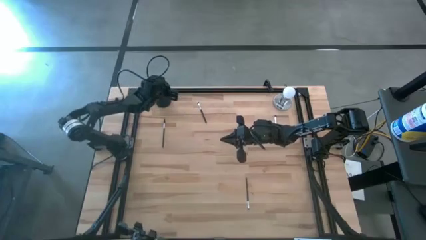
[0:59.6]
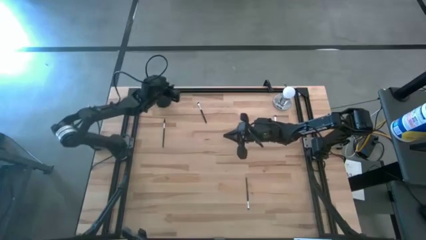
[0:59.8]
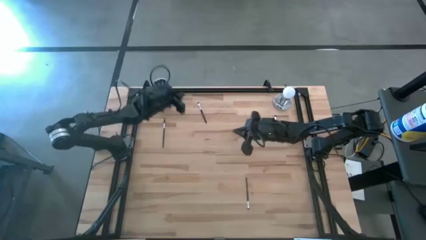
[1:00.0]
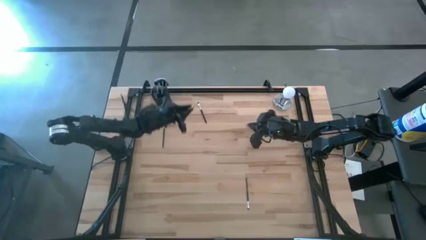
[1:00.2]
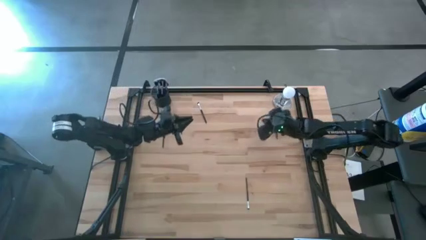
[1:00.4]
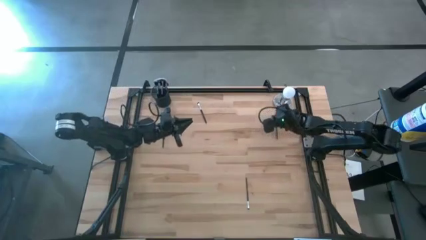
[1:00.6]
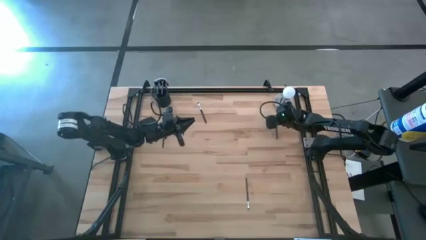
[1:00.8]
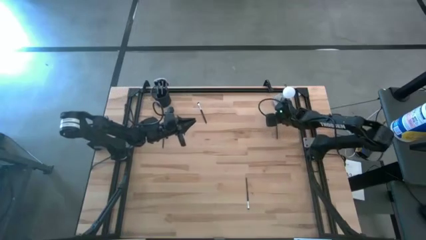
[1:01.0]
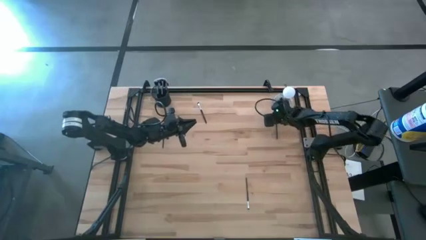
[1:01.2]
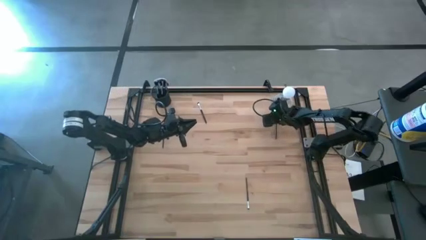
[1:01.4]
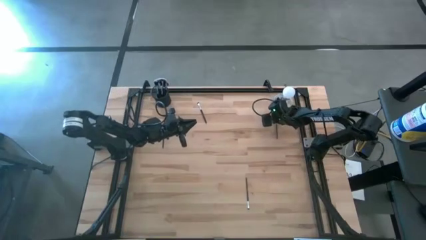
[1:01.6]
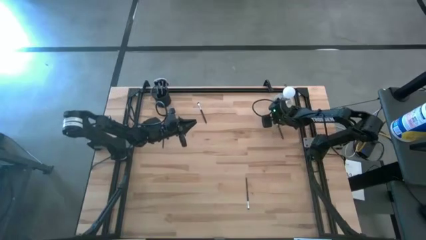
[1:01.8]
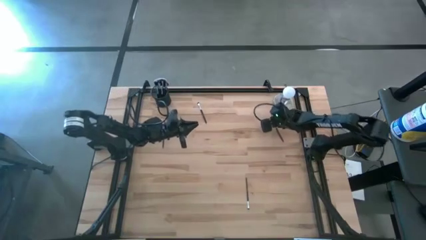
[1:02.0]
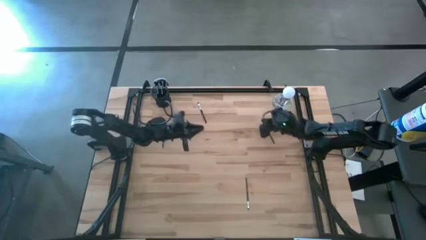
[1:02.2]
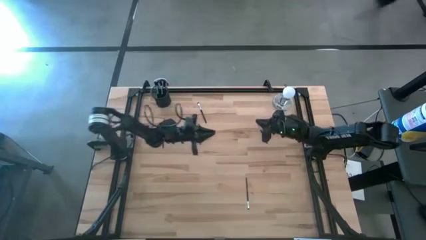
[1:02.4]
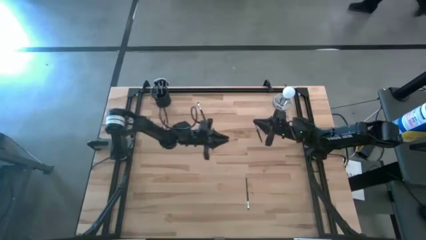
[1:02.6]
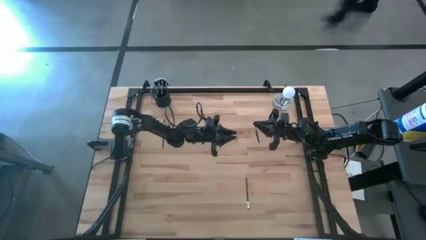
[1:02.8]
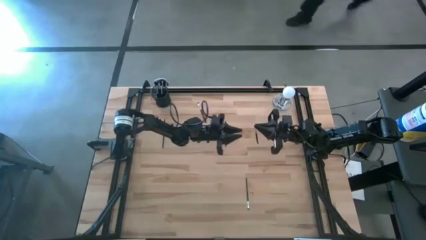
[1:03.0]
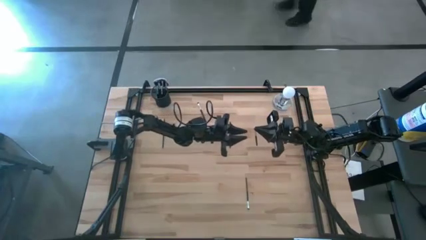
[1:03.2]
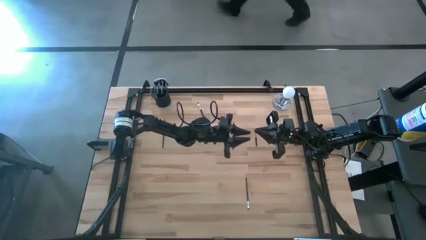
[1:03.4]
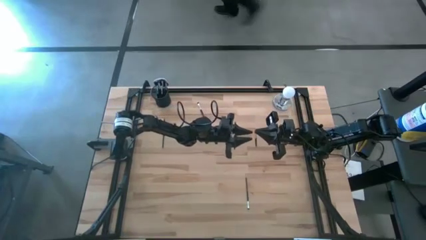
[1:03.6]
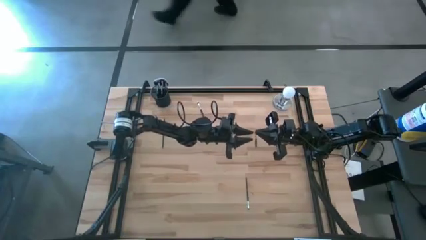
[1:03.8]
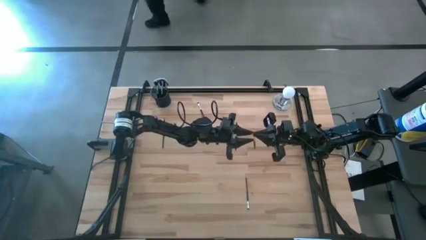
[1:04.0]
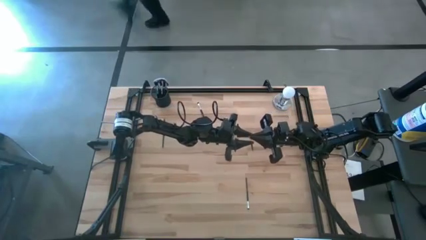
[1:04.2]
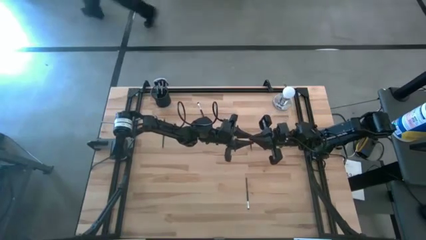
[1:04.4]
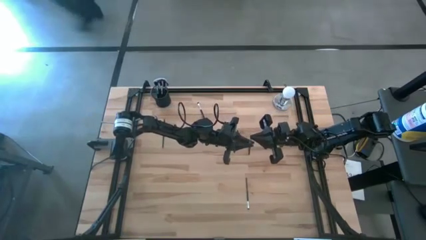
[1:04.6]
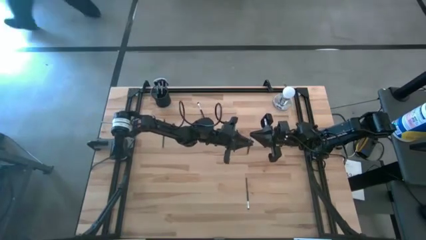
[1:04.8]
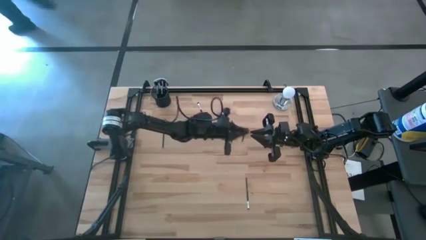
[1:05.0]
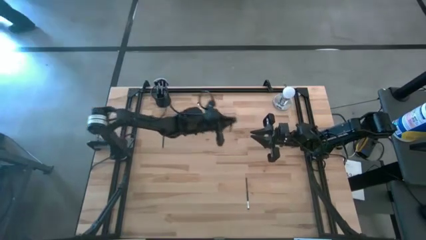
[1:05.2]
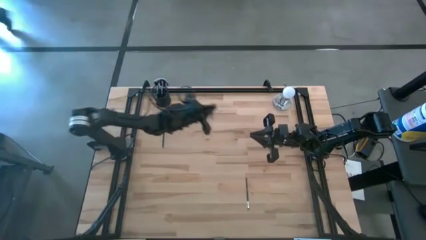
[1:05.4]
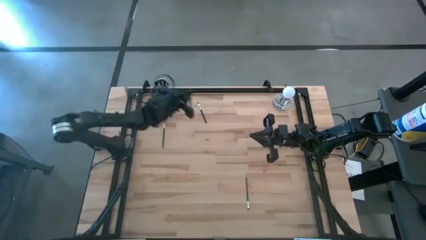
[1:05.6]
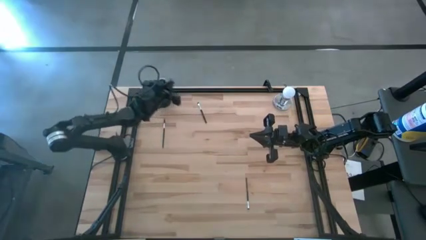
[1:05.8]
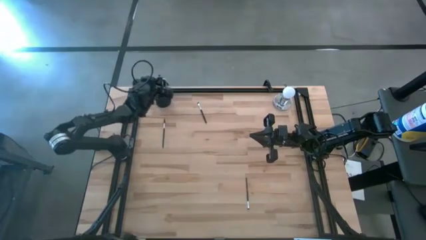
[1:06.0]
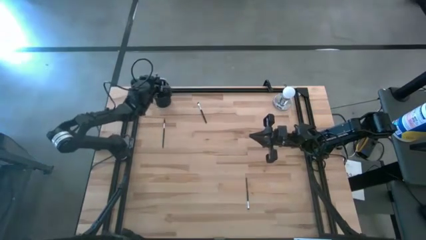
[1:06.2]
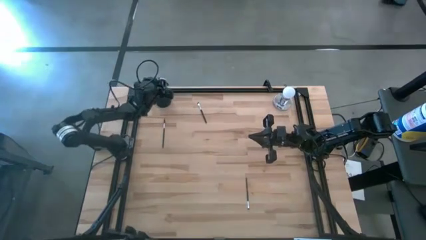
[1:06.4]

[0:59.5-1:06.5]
Task: Put items in baskets/containers
Put the eyeshadow brush into the pen holder

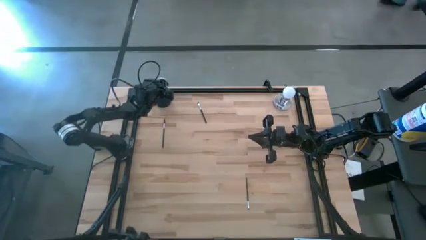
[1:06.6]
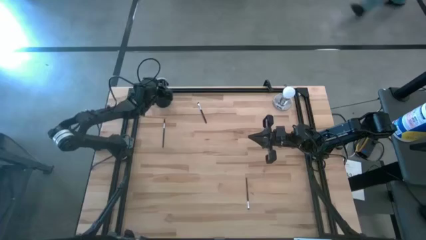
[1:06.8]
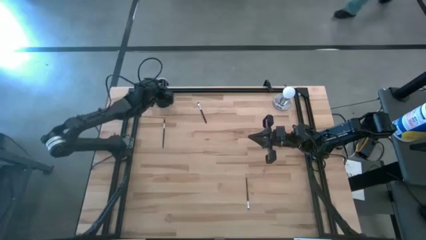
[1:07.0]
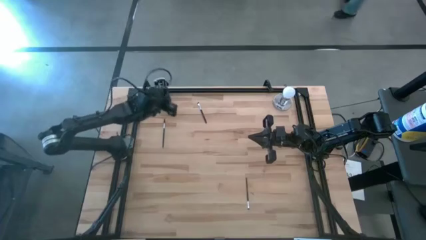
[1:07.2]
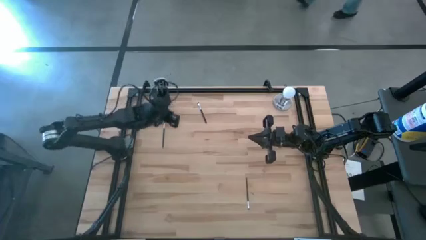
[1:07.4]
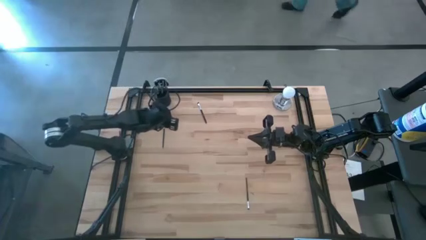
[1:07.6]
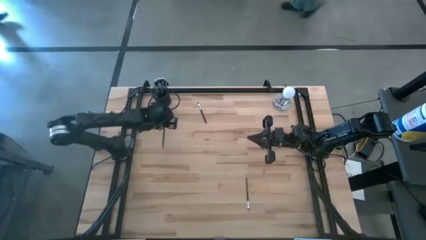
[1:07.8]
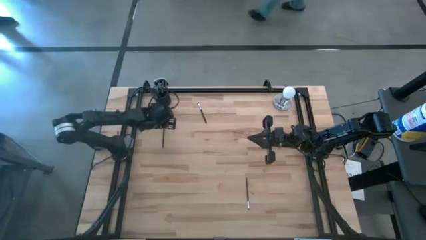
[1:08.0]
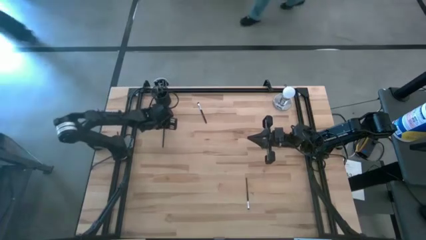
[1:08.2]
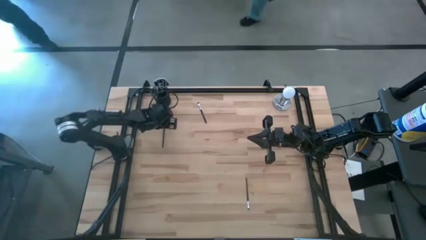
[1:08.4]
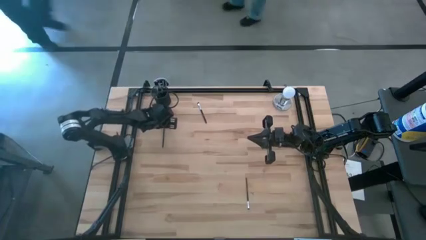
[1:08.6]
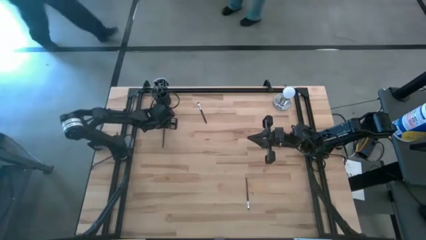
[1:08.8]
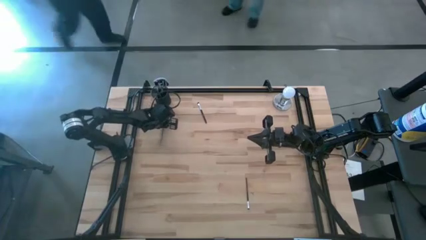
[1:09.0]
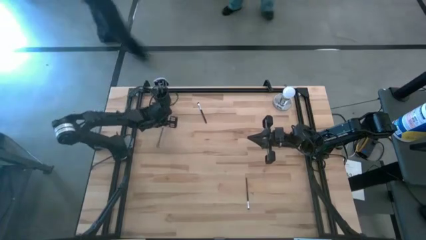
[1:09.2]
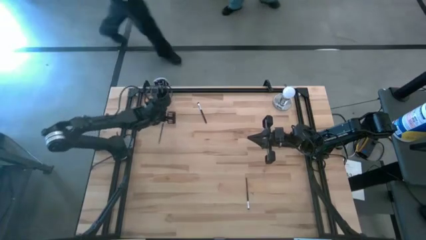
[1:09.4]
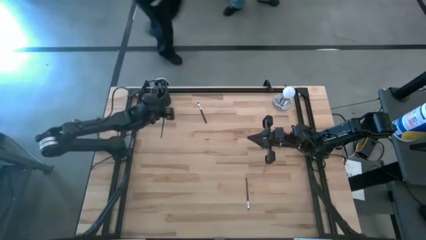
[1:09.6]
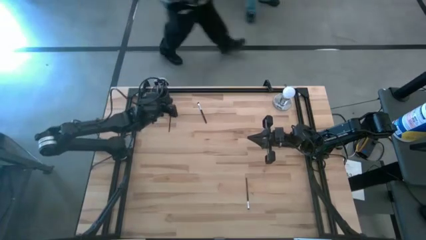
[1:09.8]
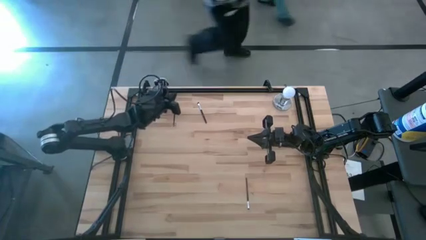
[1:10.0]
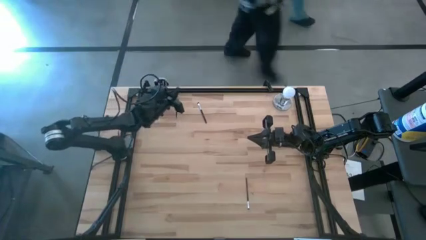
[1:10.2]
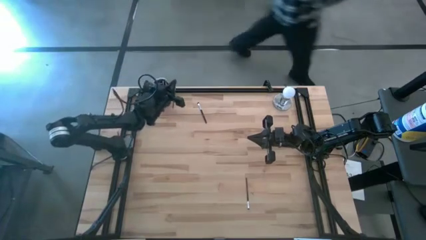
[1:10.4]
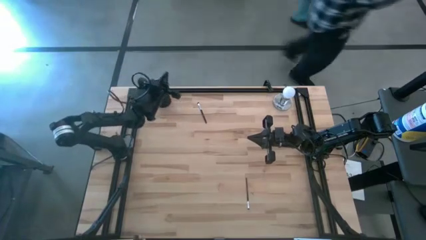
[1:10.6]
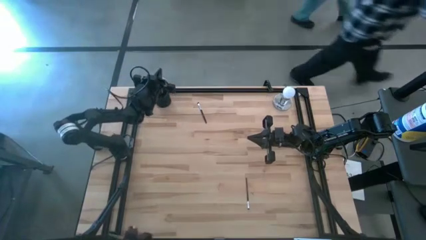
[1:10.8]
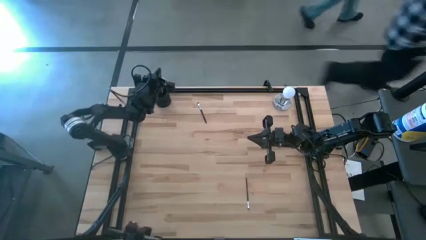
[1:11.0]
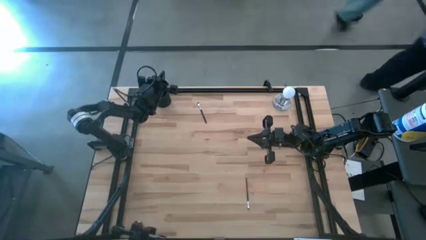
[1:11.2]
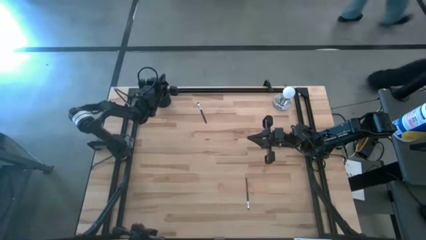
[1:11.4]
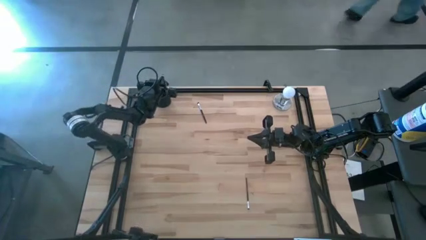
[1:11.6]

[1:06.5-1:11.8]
Put the brow brush into the pen holder

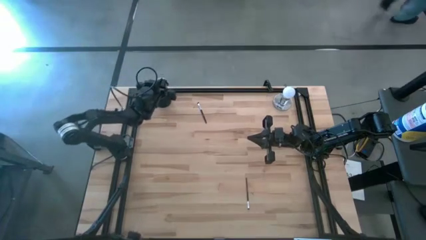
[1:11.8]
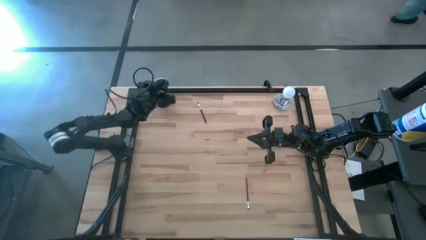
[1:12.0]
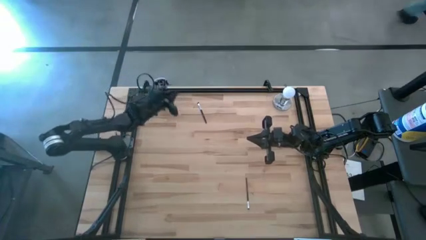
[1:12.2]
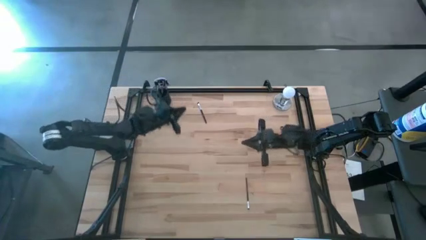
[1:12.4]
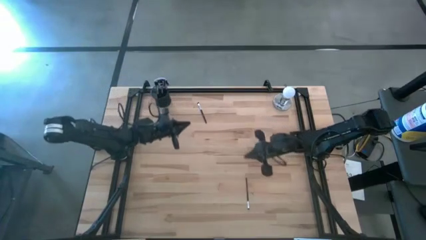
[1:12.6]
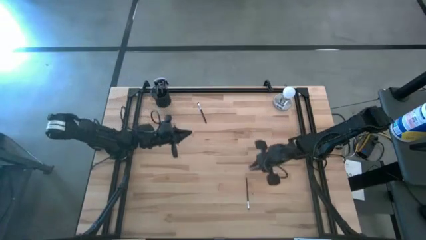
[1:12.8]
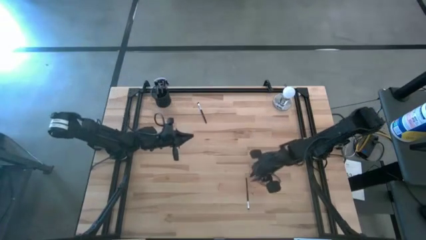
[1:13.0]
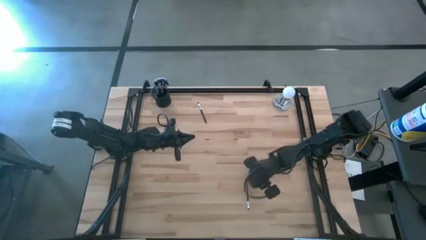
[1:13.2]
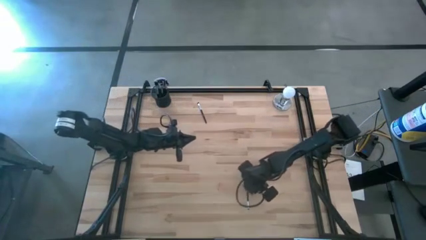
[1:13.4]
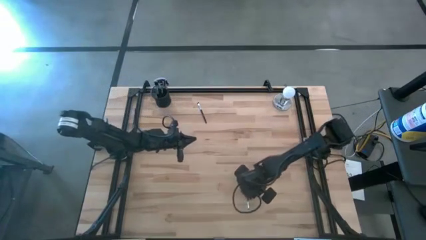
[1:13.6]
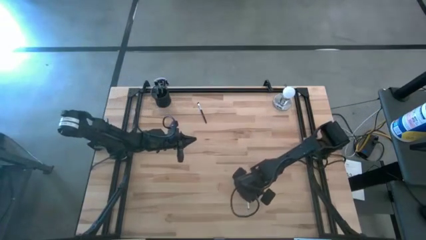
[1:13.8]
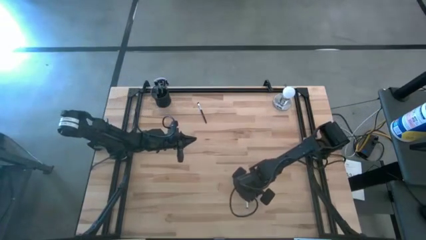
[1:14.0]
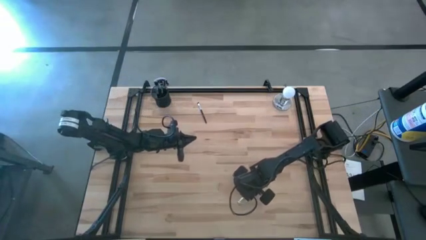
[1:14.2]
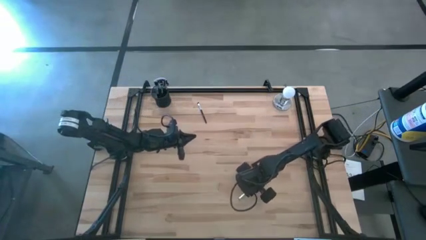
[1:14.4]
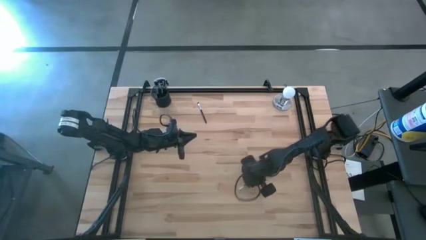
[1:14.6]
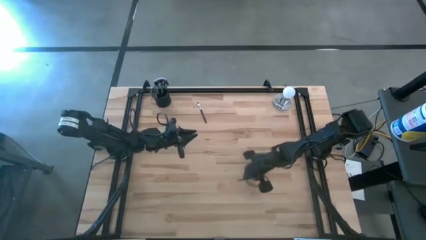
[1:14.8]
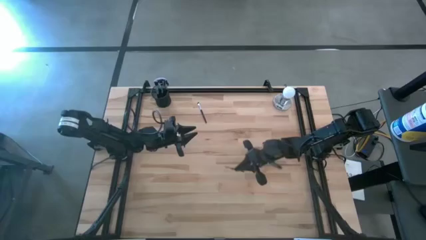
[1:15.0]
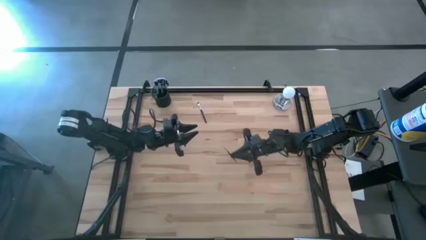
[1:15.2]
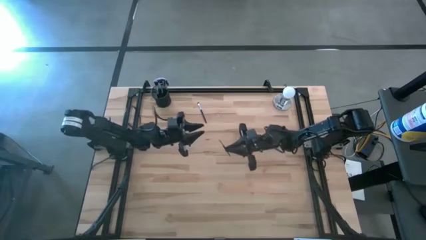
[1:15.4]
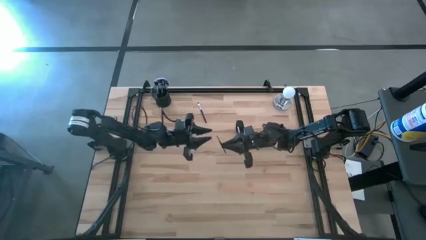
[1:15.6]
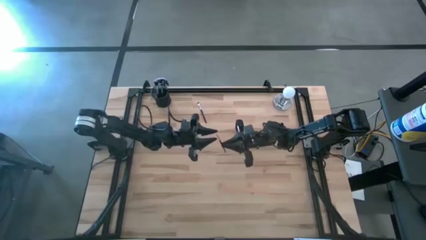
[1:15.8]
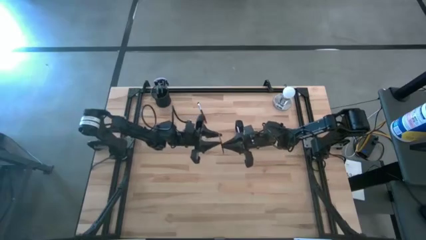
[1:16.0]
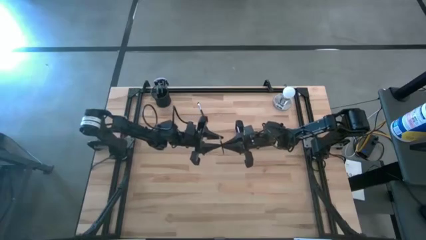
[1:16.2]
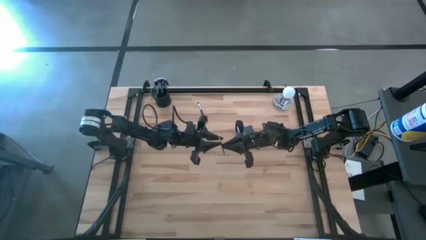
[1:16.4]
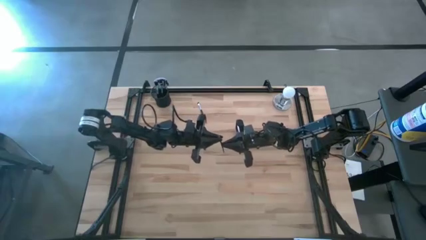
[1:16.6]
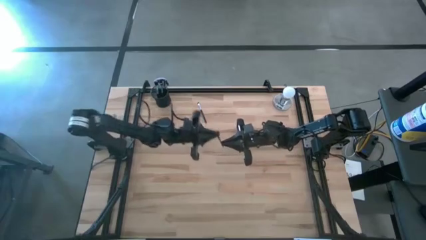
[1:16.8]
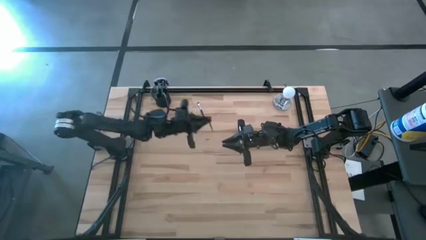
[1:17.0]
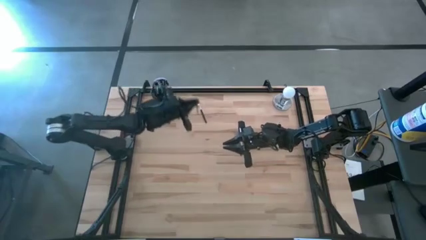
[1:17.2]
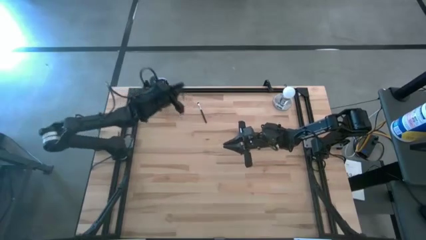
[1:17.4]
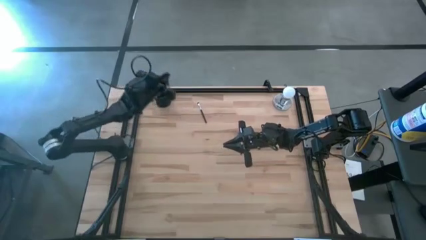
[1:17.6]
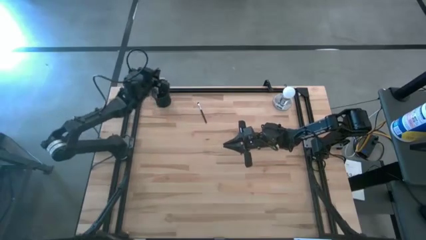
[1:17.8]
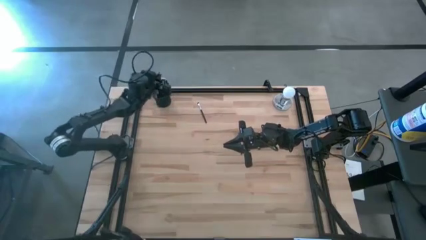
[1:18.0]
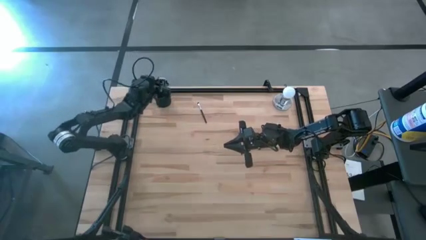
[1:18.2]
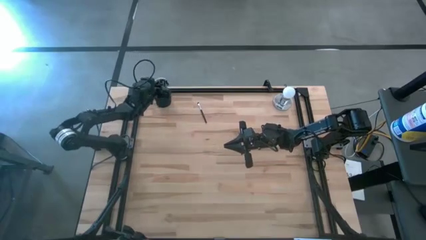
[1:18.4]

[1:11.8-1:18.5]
Put the foundation brush into the pen holder
